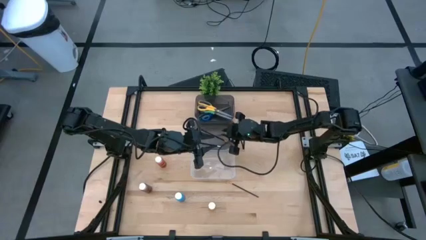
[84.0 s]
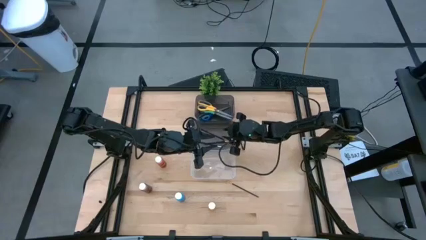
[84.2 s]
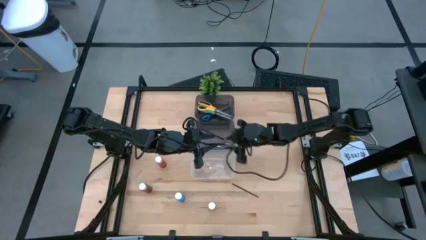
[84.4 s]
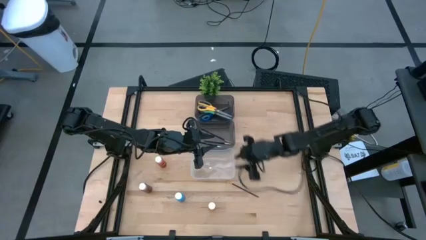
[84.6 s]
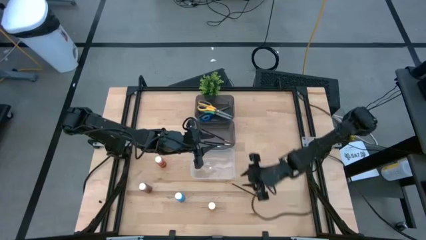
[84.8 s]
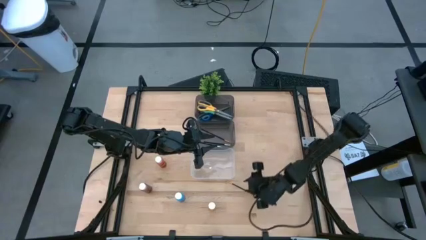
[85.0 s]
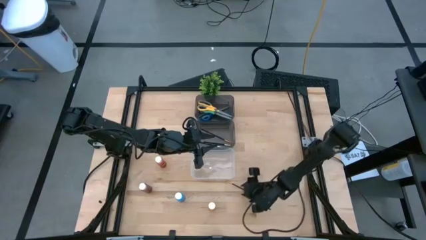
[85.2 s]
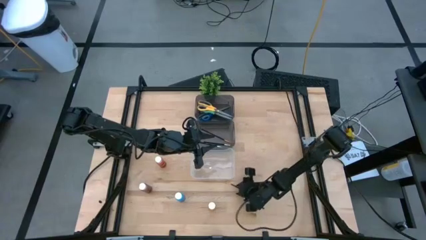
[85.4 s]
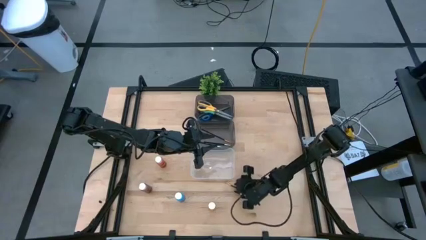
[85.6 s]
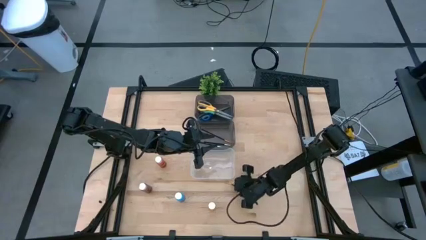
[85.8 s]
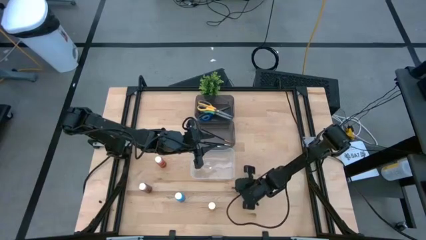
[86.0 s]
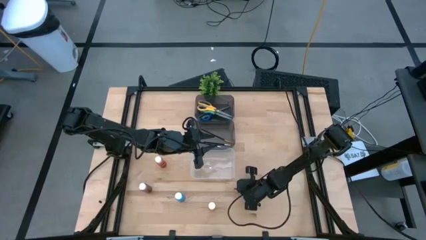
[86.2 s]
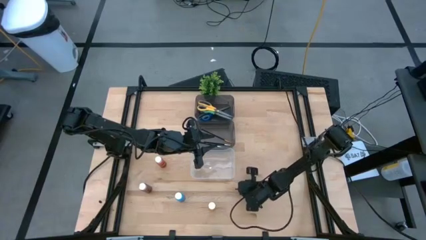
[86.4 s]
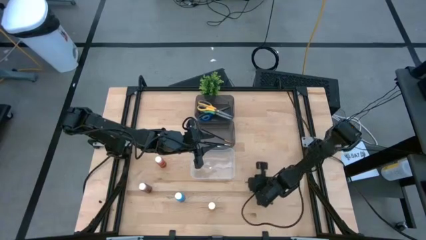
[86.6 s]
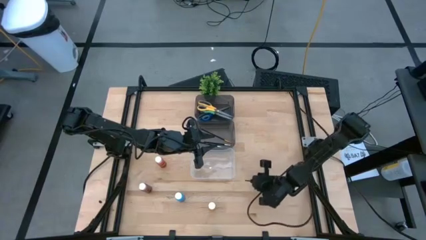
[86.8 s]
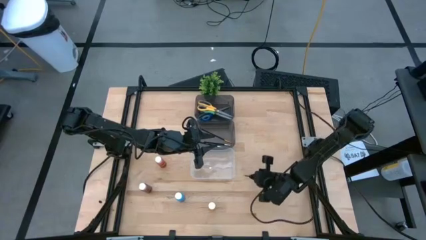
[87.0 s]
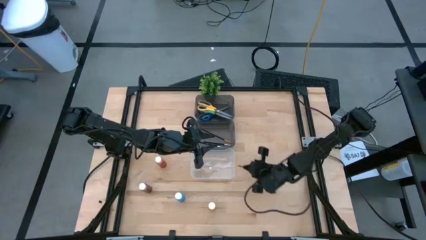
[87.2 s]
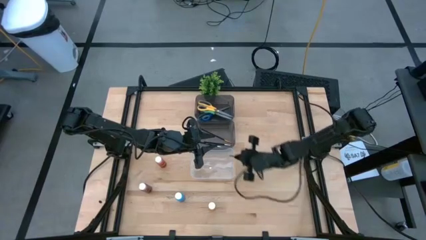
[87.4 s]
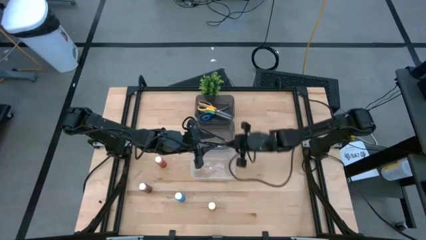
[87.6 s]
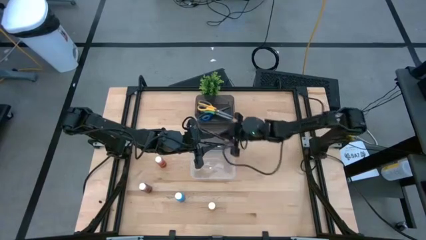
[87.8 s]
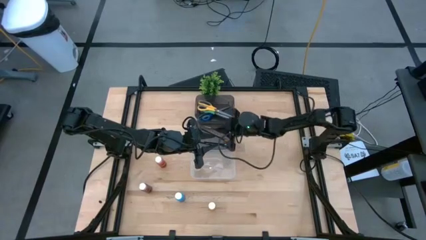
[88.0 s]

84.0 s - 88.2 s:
Task: Pick & Place Paint Supplies
Put the gold paintbrush into the bottom black bin

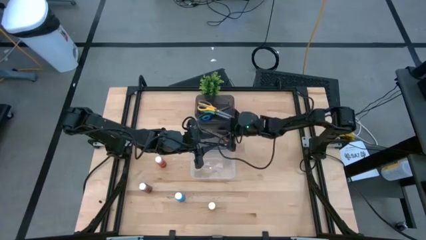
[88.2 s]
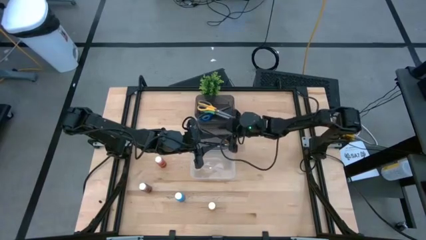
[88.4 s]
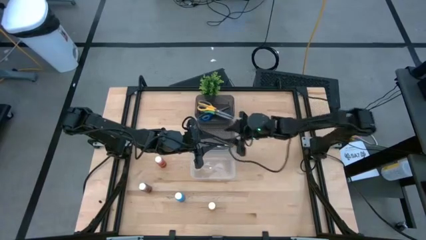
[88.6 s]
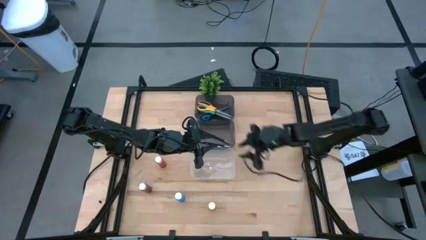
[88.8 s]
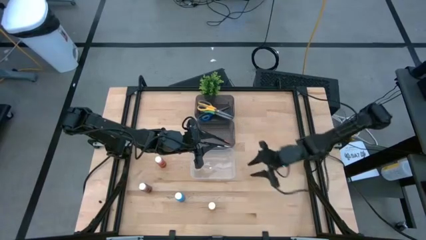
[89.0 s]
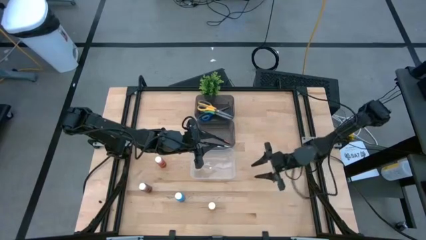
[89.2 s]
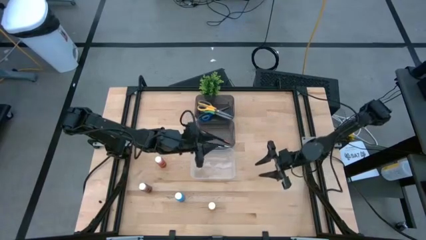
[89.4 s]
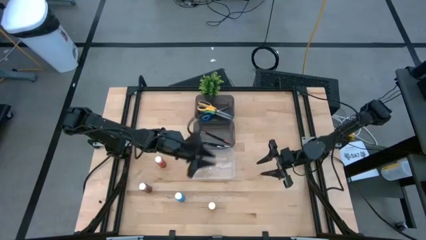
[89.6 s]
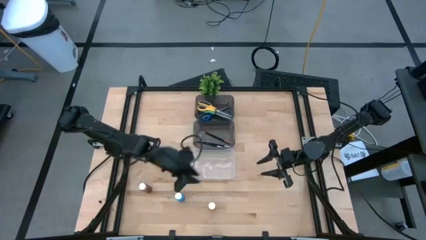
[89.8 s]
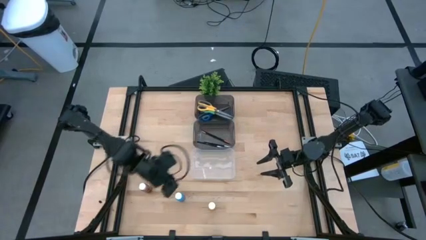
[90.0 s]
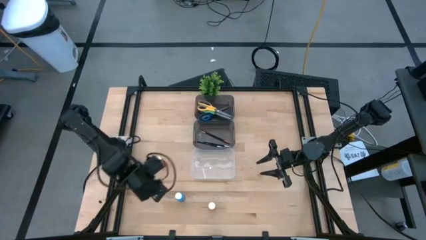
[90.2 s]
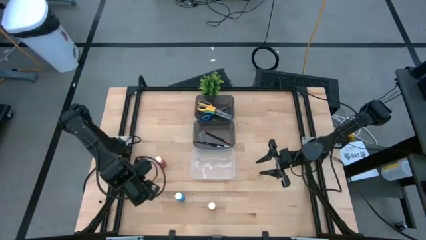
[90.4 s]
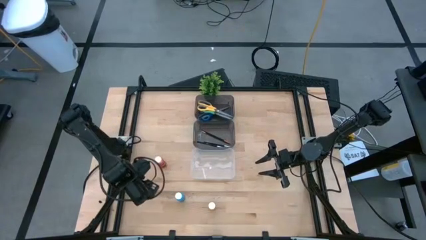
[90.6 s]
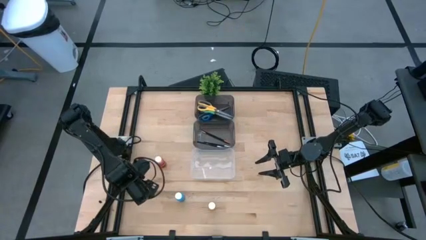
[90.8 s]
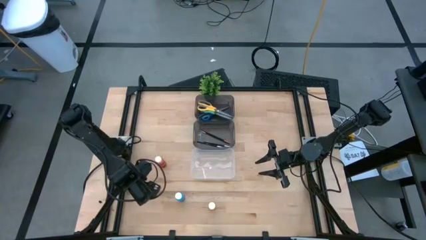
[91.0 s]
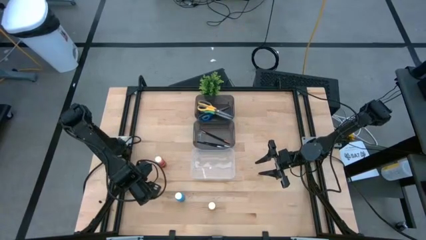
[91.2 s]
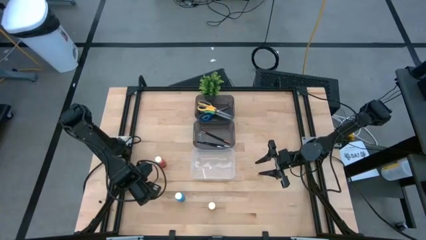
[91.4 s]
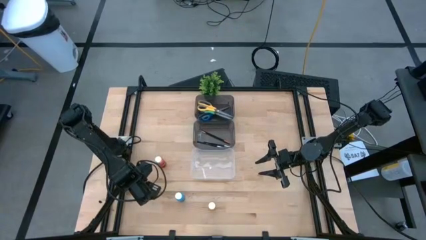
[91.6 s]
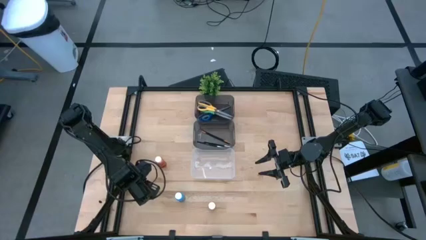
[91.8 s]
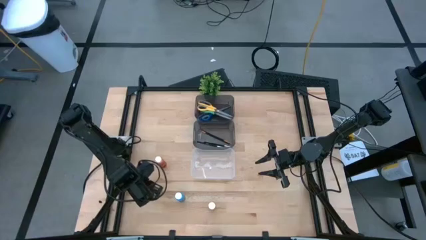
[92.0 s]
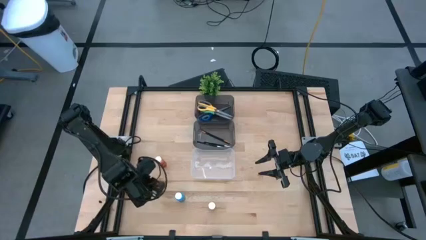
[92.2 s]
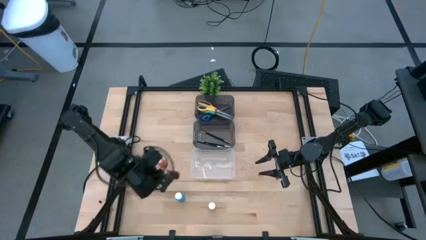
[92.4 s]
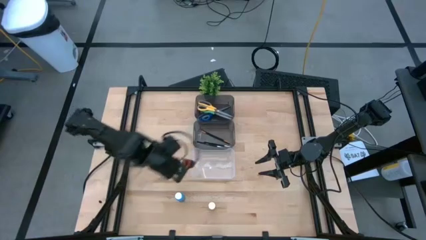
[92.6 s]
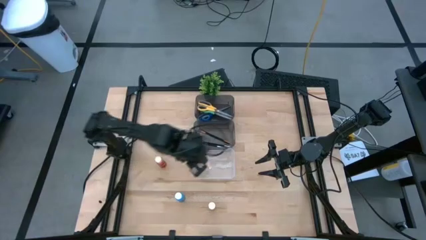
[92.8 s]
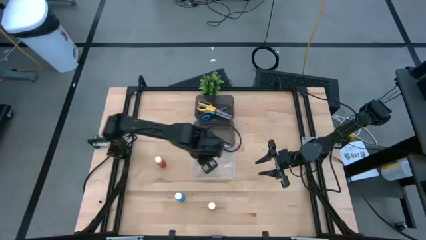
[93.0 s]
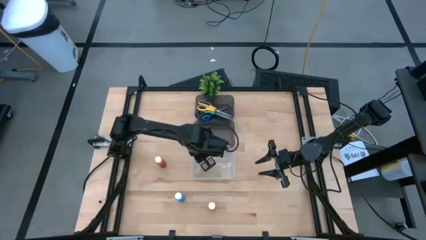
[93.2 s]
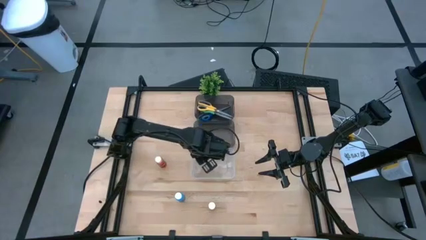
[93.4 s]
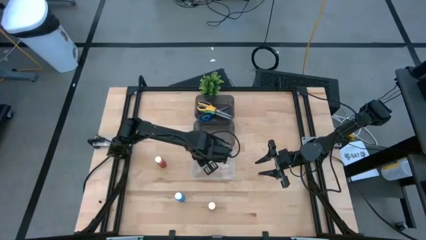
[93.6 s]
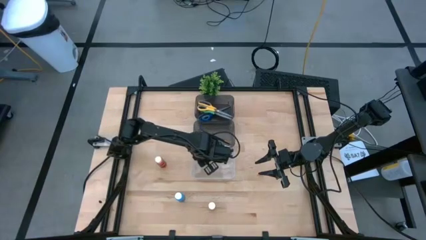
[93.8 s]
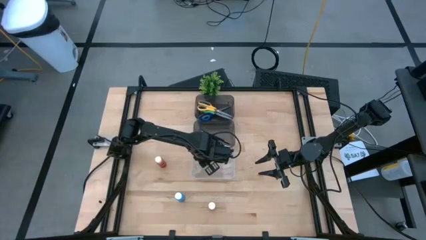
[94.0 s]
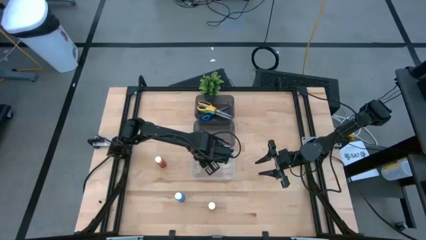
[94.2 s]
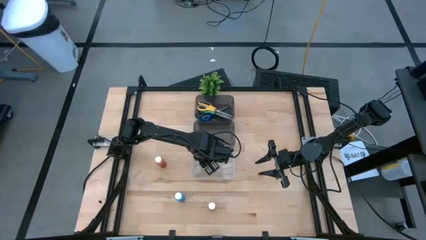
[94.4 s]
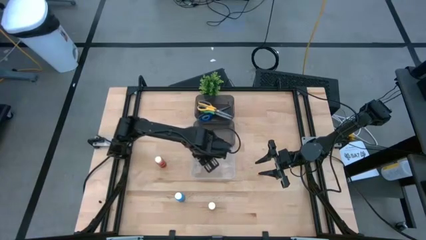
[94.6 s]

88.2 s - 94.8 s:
Put the brown paint bottle into the transparent bin

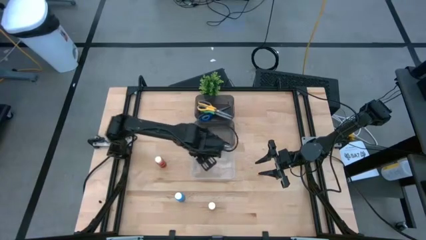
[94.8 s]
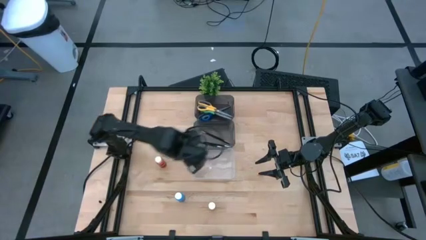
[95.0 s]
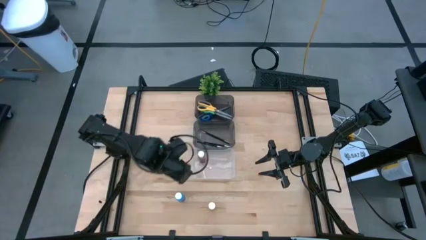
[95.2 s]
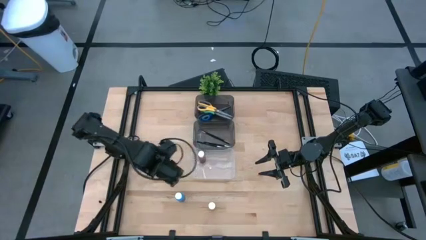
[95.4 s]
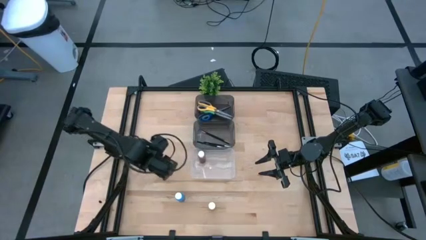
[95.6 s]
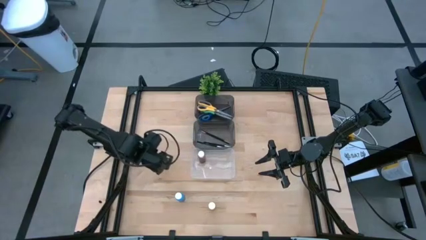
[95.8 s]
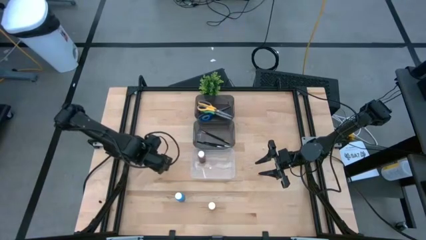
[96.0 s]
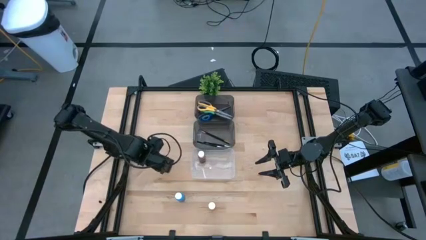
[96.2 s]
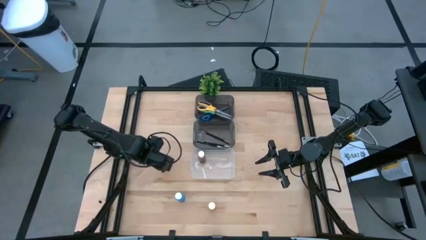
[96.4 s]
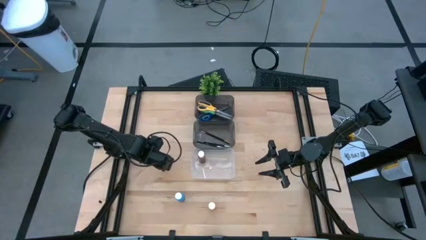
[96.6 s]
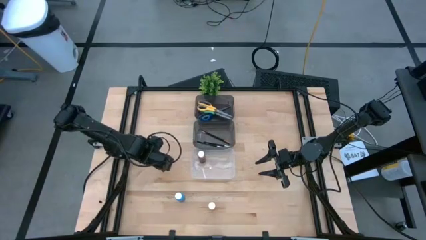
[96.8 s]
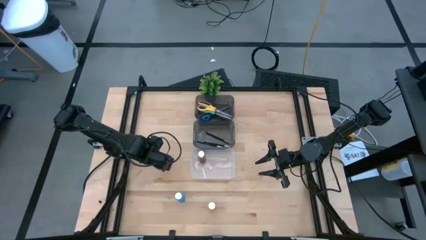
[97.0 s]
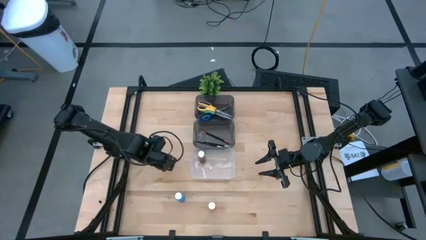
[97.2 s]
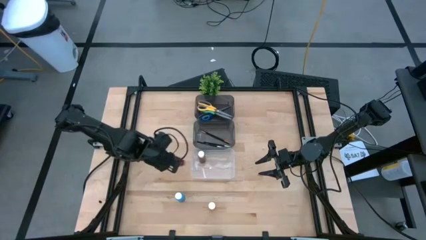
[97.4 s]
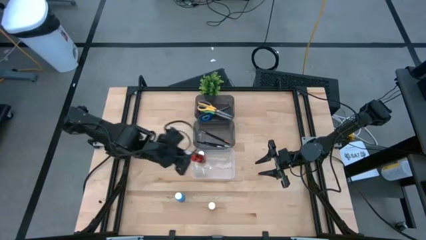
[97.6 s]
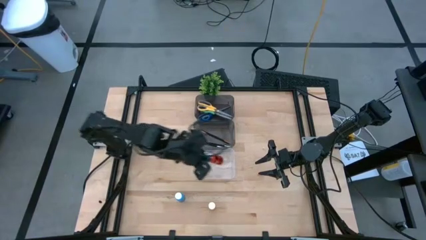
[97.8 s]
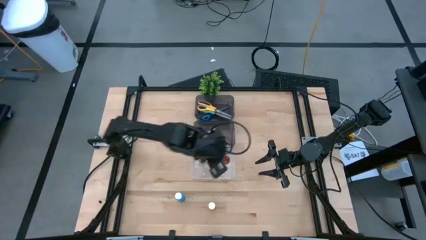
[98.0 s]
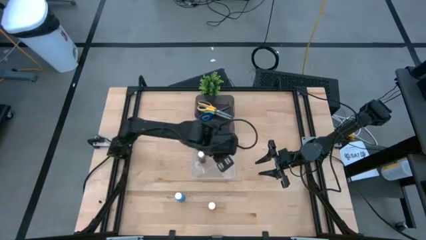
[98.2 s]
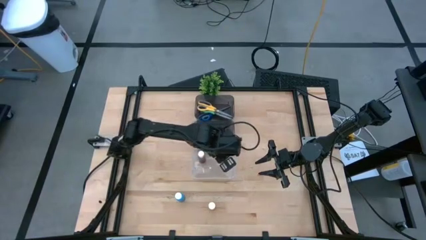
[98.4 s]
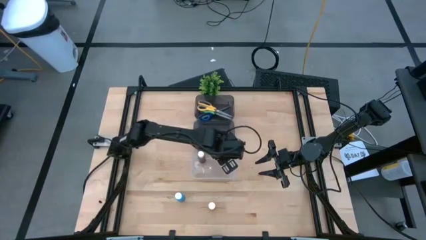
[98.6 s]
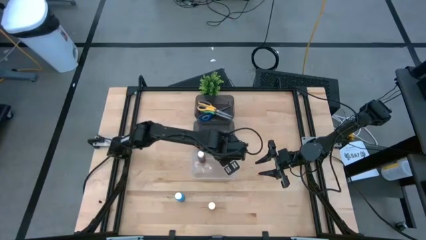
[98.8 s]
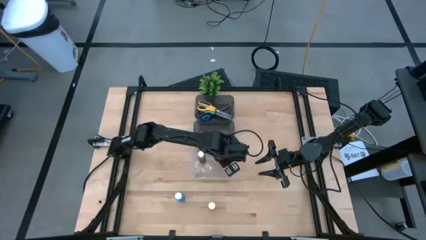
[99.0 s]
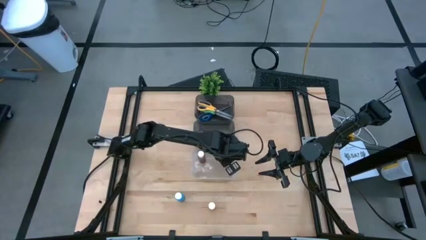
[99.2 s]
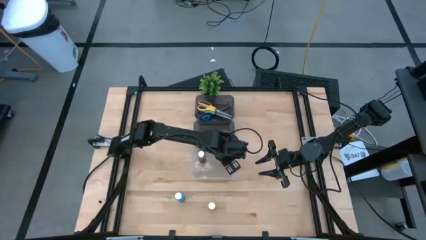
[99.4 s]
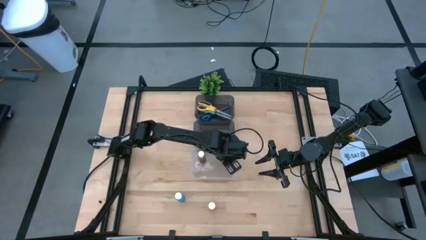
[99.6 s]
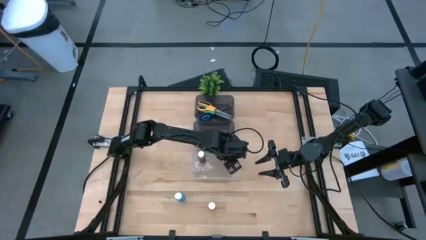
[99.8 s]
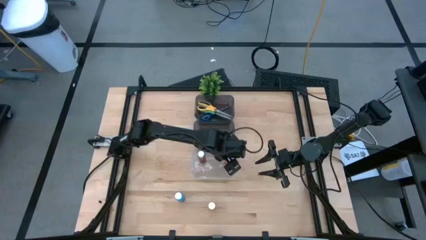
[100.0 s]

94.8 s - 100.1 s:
Put the orange paint bottle into the transparent bin
